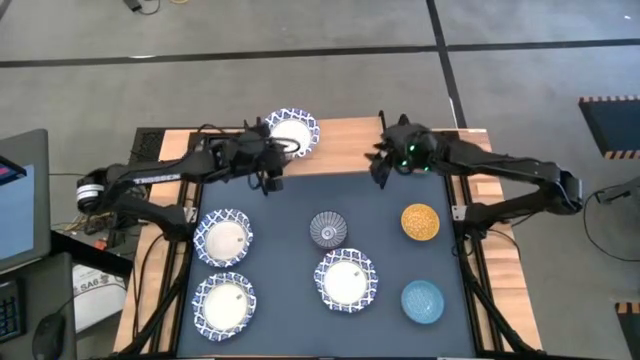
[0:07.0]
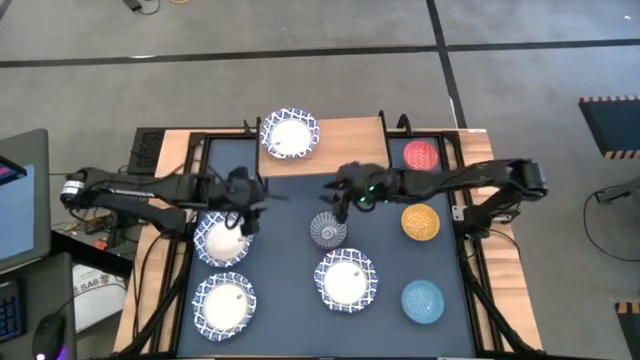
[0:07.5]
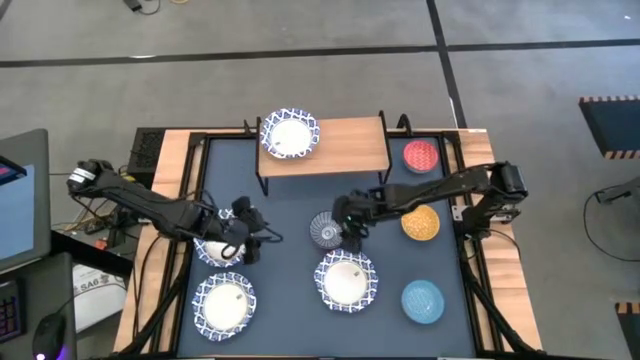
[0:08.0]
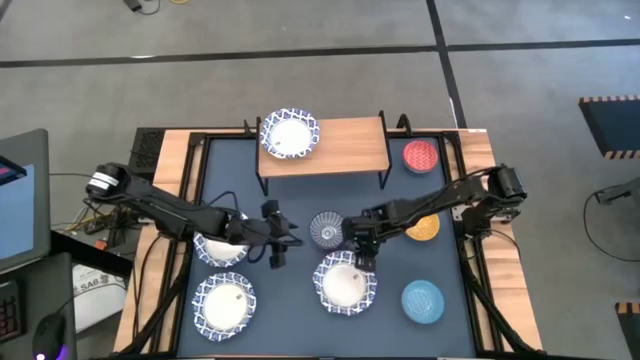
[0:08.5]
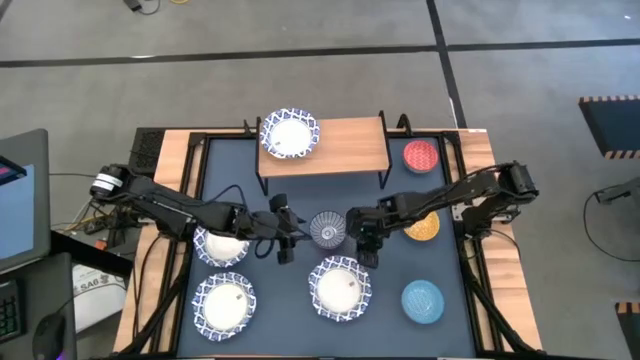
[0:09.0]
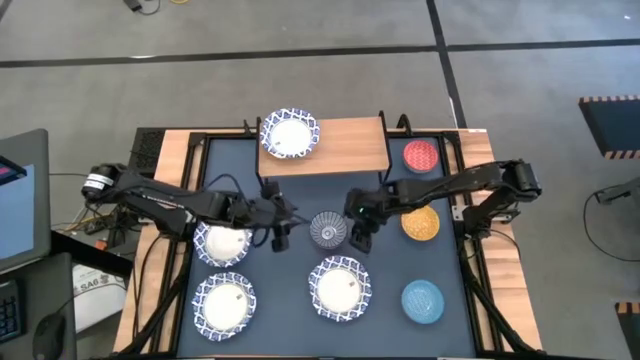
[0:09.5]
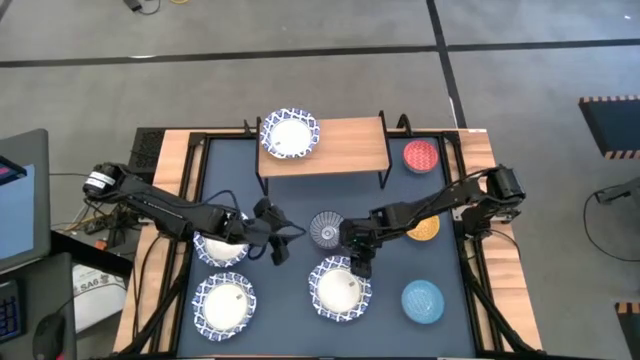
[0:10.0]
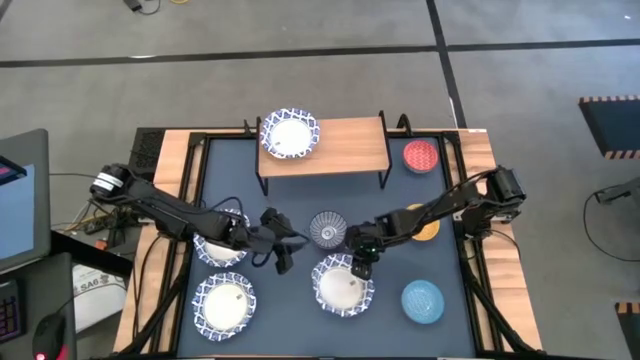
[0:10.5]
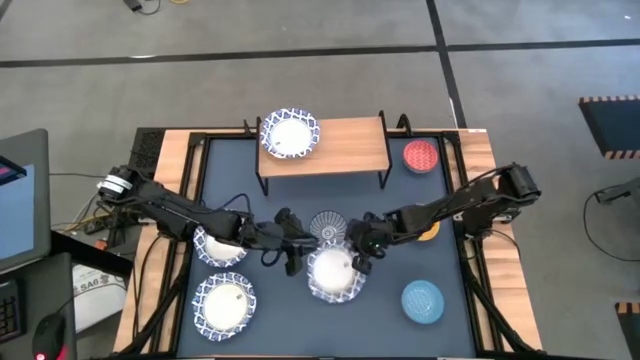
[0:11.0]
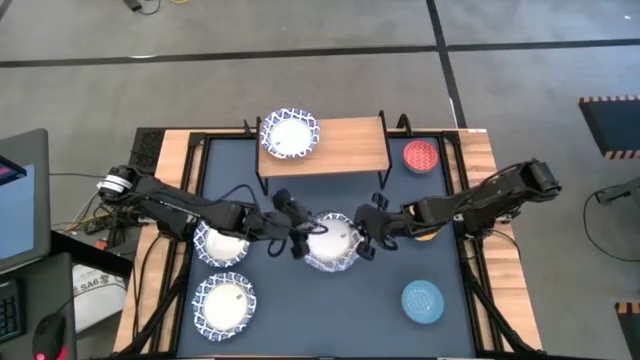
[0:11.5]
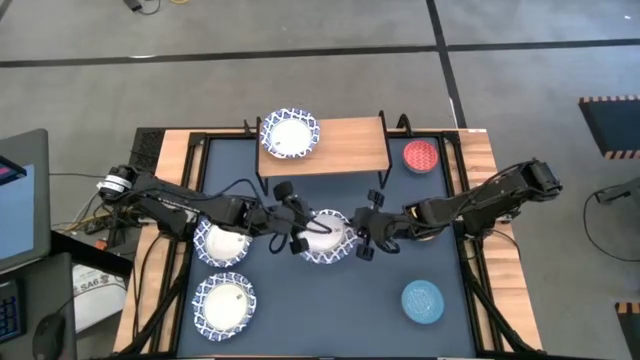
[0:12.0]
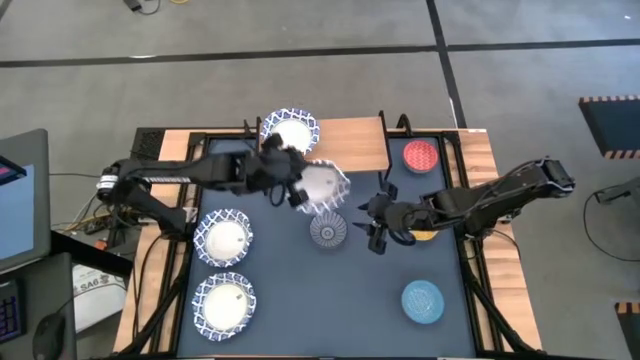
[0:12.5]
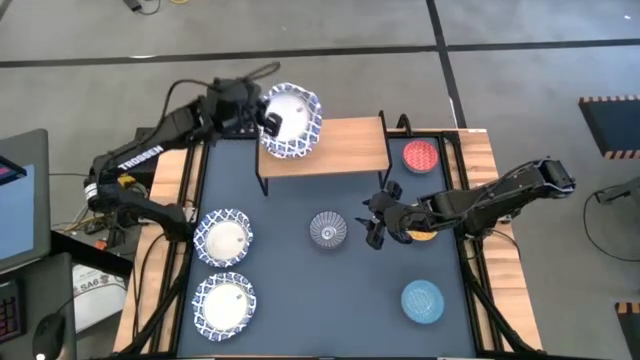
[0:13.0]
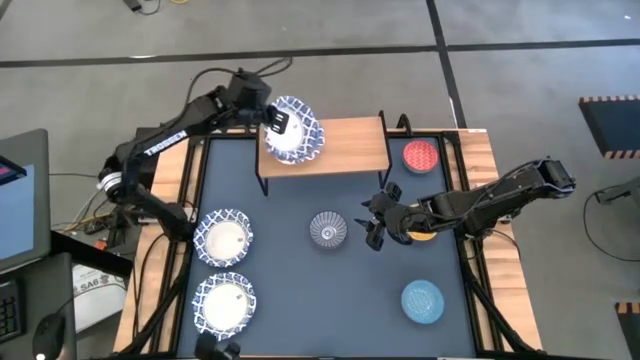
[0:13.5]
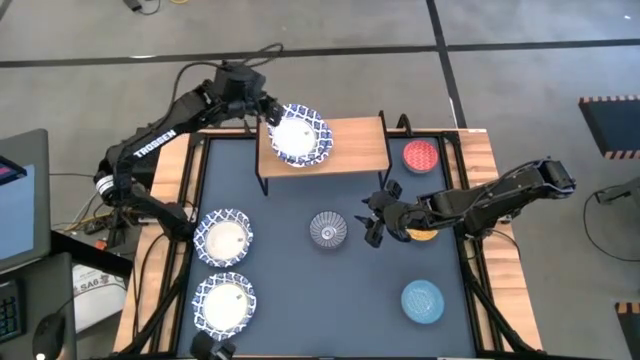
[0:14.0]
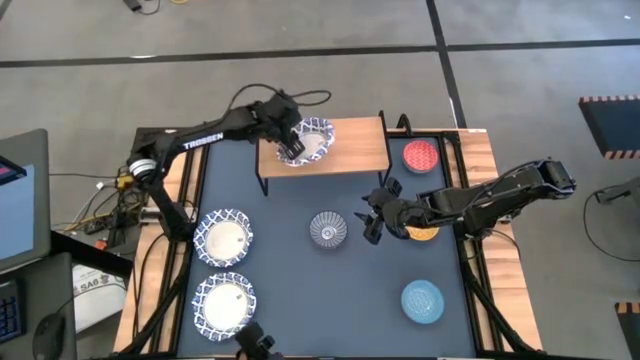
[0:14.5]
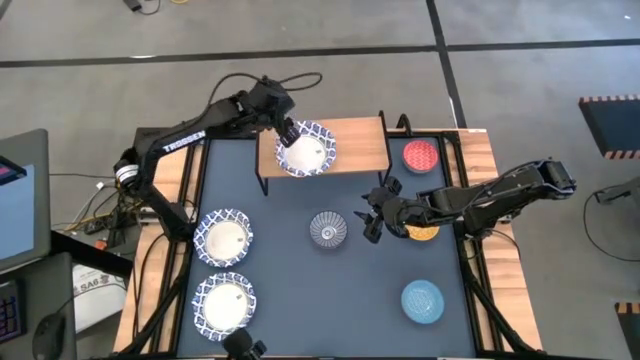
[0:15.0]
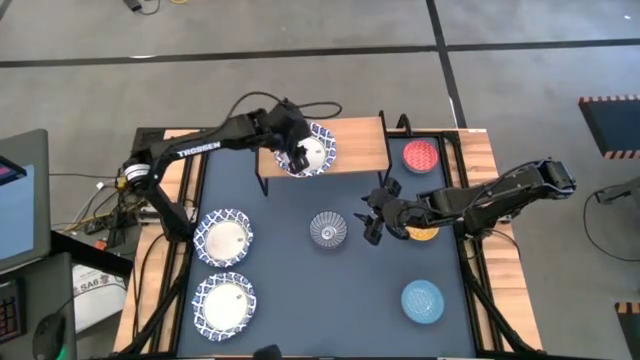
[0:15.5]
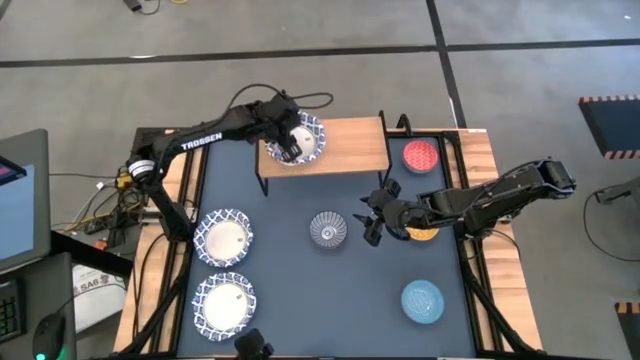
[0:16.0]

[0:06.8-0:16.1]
Task: Place and stack bowls onto a shelf
Stack the white patterned bowl on top of the white patterned bowl on the shelf

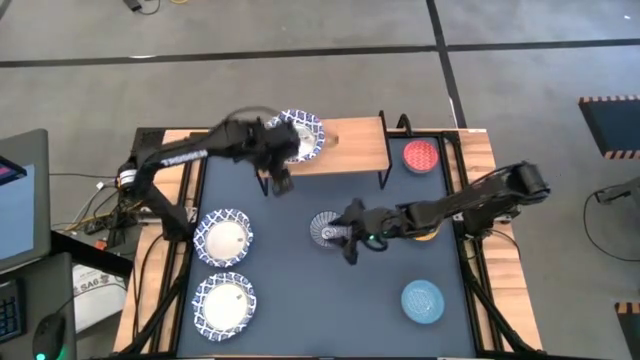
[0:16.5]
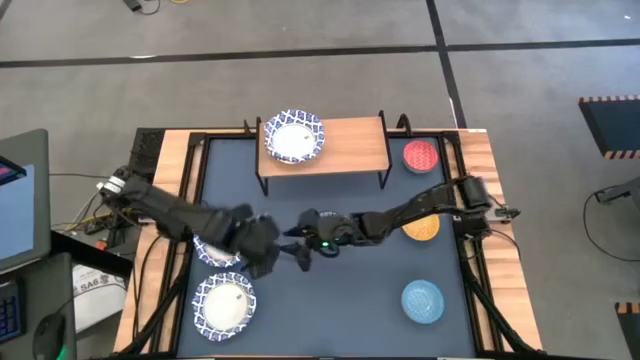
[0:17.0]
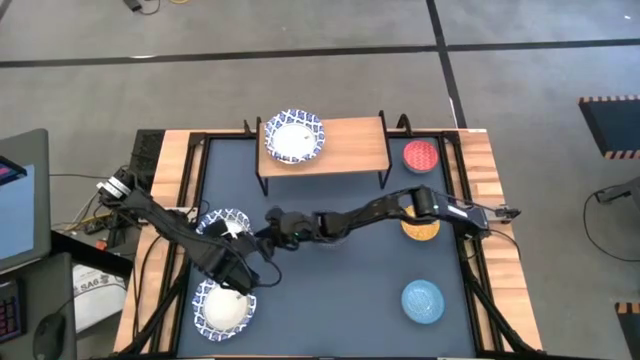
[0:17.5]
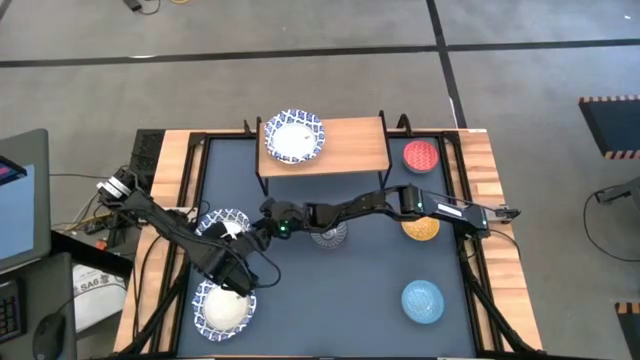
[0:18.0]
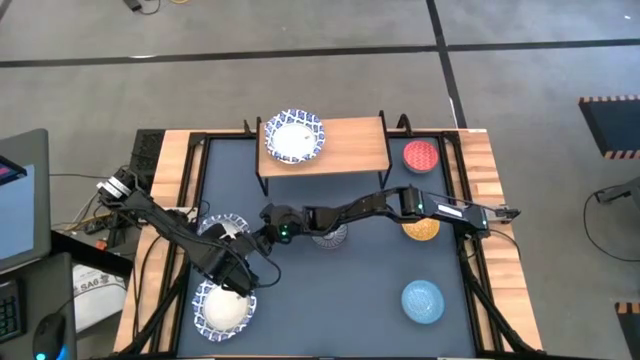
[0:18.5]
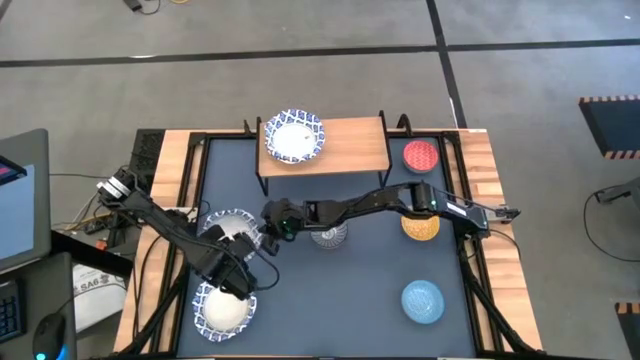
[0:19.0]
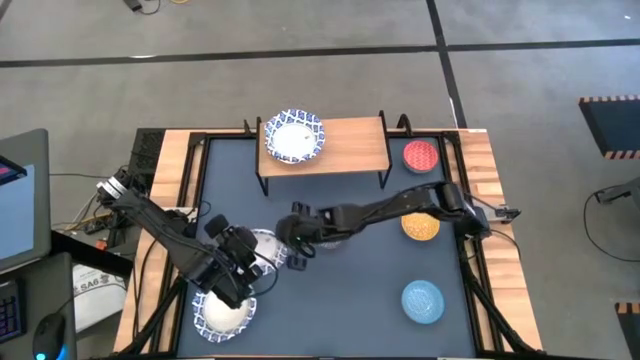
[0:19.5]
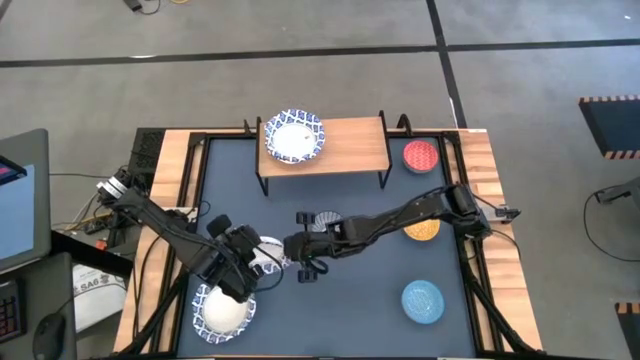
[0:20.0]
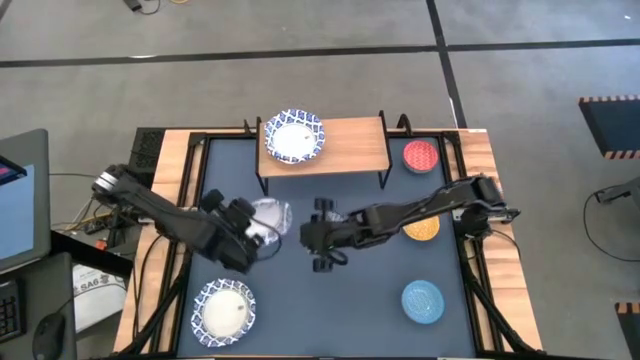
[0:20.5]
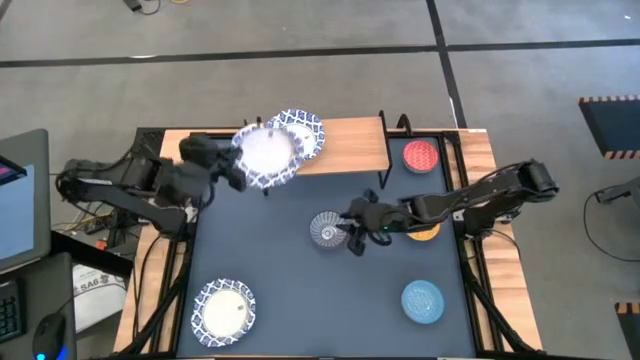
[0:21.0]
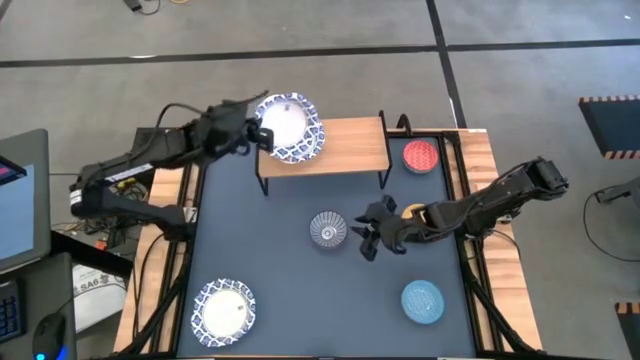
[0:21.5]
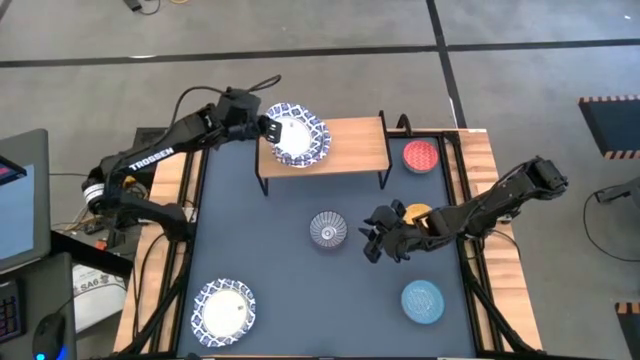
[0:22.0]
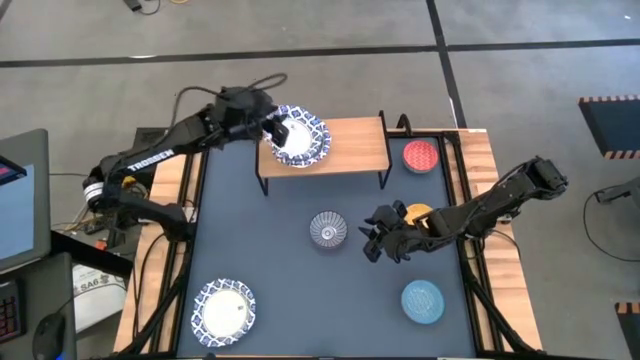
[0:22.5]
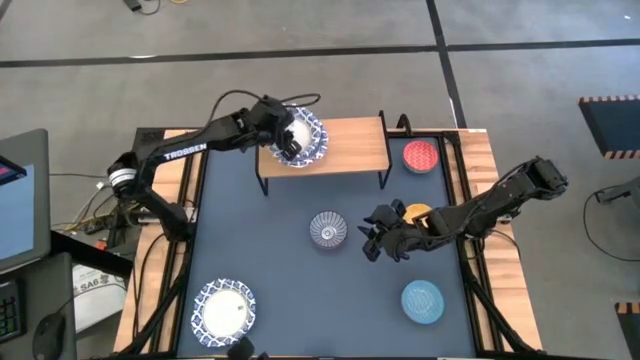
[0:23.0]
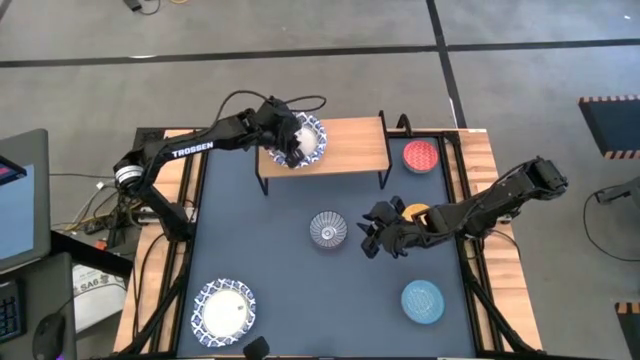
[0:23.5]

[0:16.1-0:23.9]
Stack the white patterned bowl on top of the white patterned bowl on the shelf

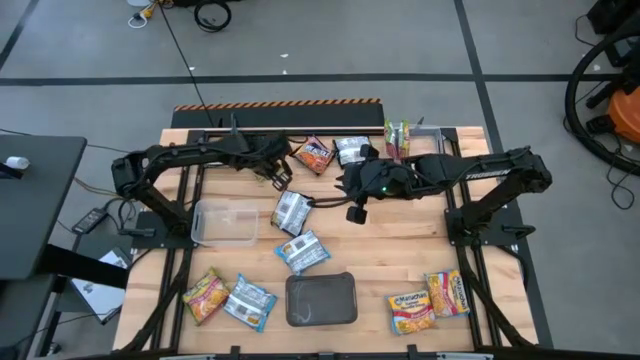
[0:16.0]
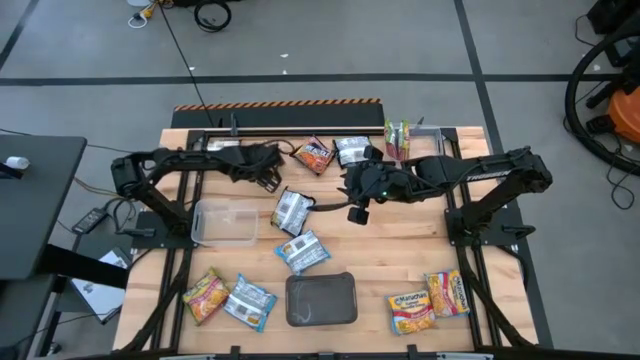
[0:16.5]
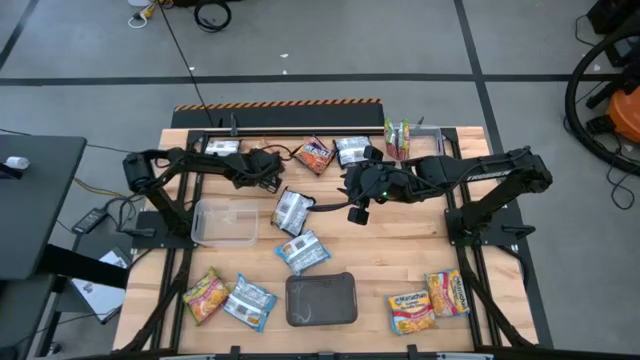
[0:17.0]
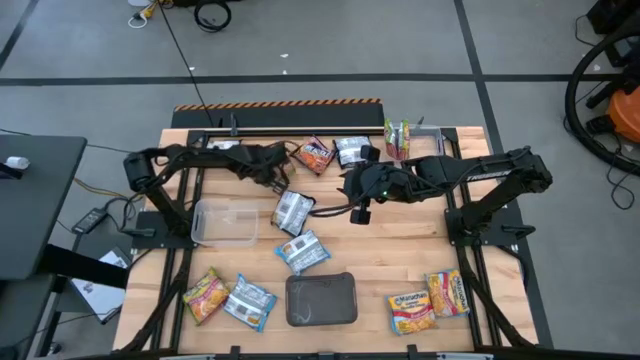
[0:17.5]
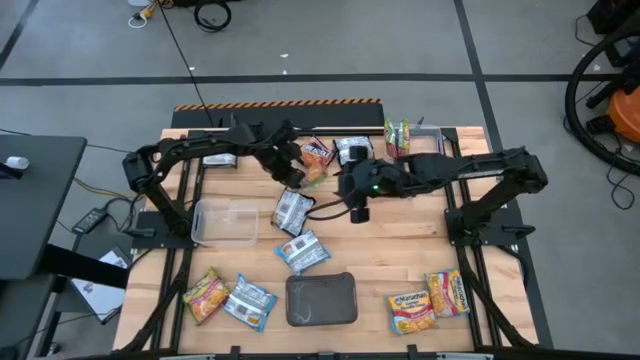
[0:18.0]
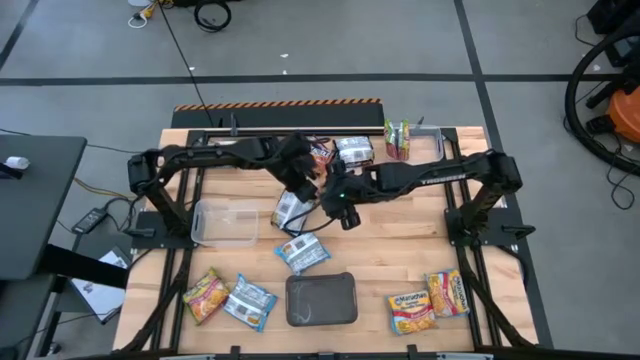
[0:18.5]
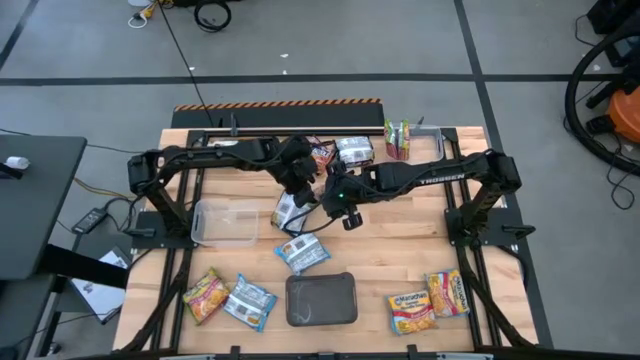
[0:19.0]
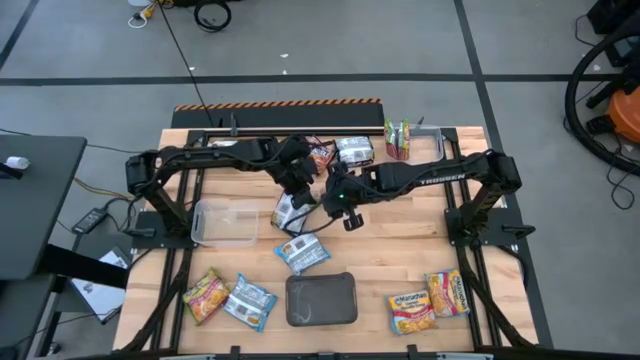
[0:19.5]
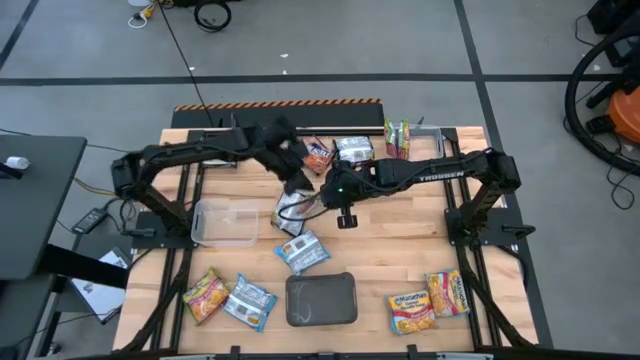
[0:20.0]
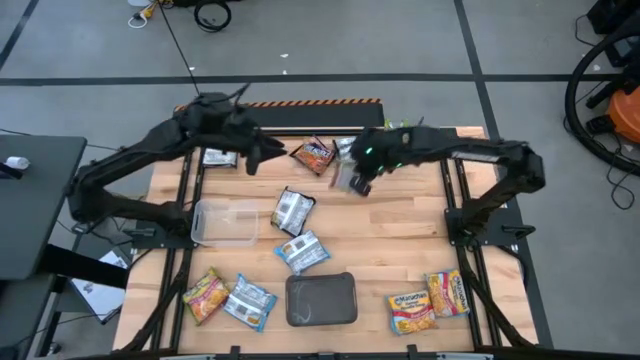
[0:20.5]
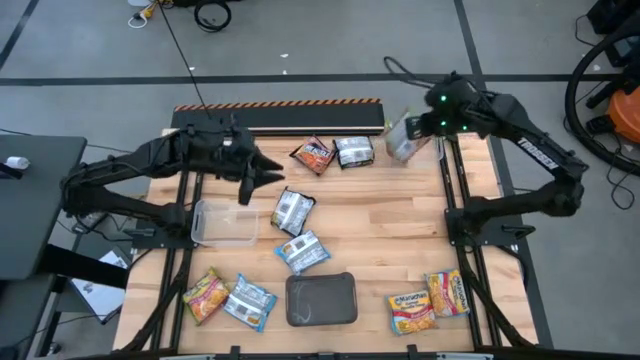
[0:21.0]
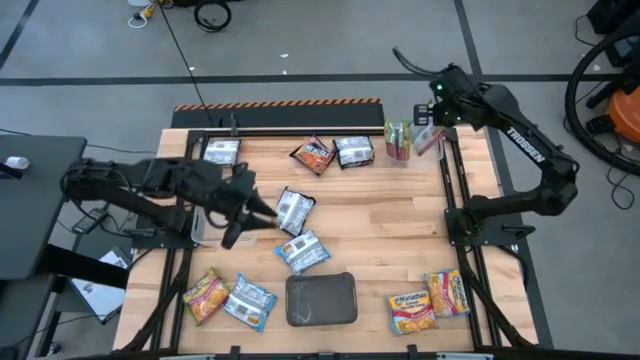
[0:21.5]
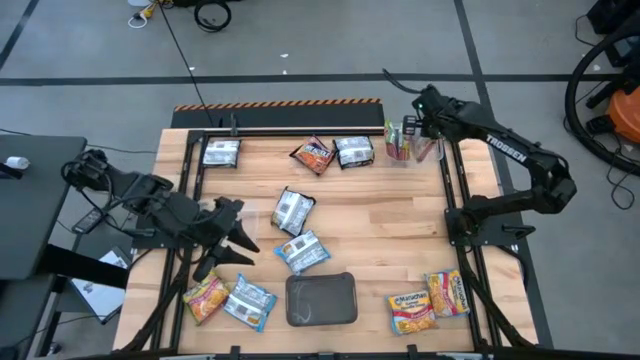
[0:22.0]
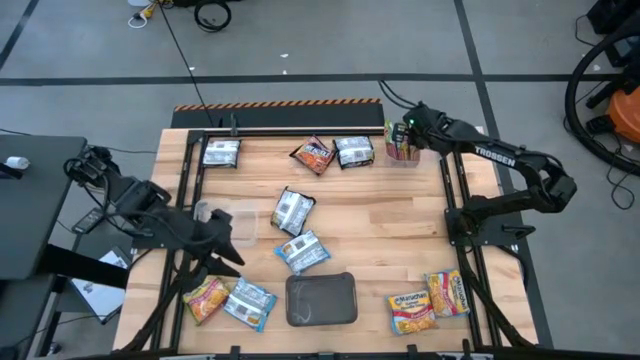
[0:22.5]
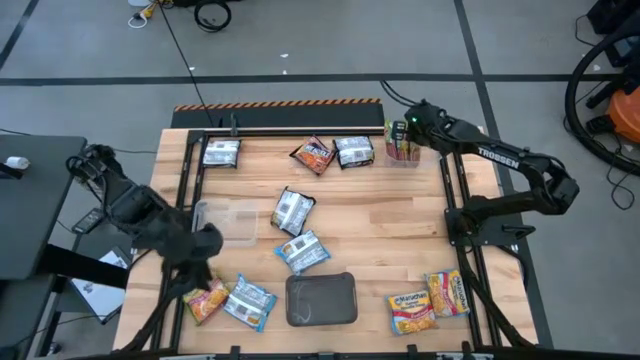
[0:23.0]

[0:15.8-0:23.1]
Task: Sort Maruchan noodles
Put the green noodle pack into the top transparent bin
